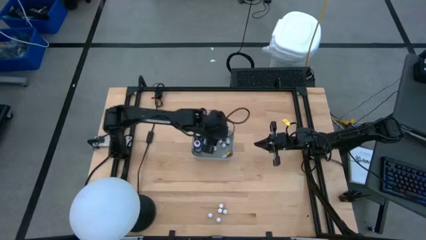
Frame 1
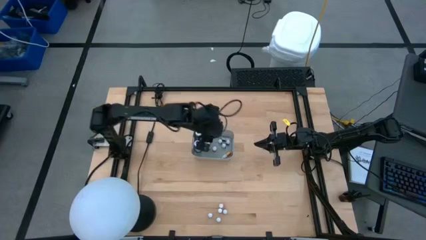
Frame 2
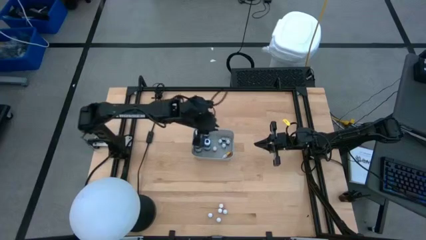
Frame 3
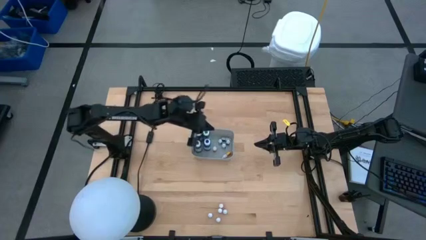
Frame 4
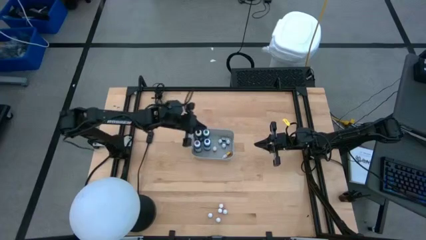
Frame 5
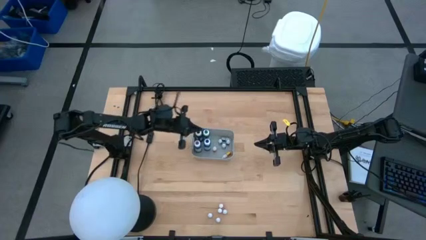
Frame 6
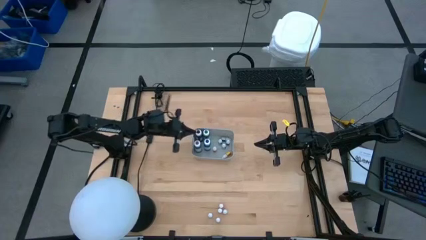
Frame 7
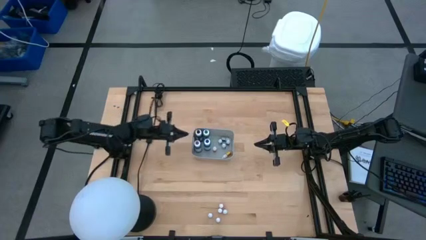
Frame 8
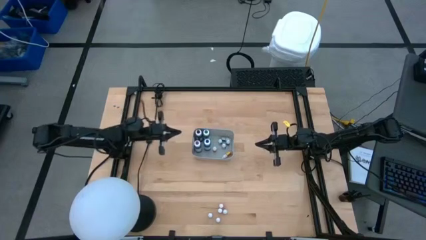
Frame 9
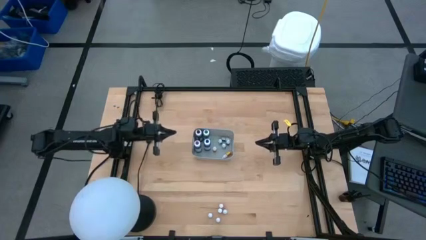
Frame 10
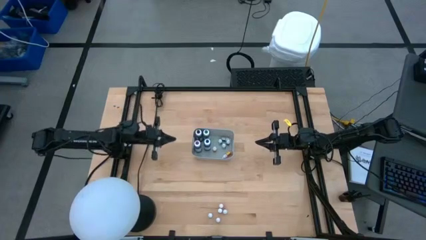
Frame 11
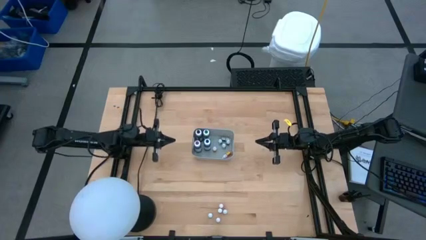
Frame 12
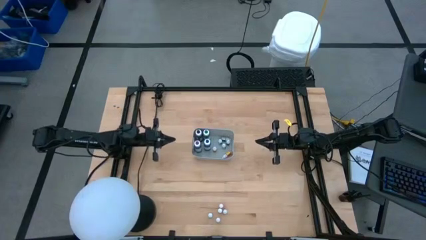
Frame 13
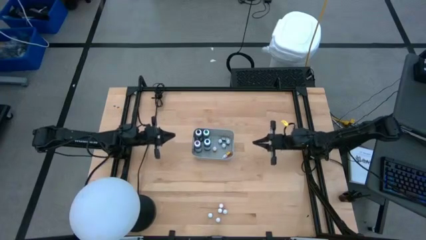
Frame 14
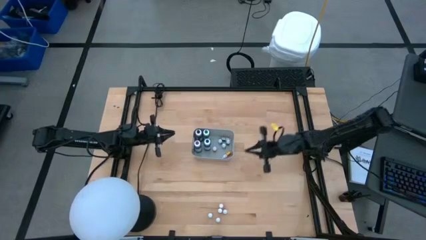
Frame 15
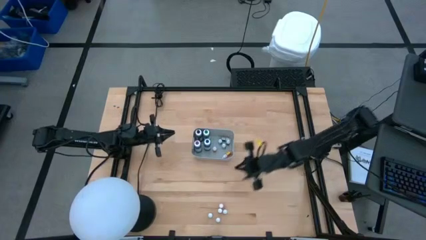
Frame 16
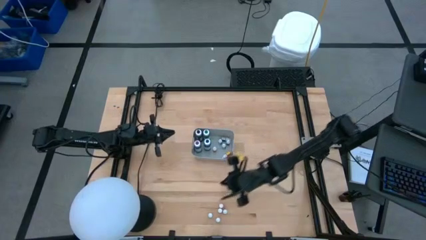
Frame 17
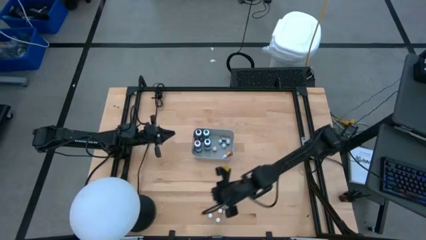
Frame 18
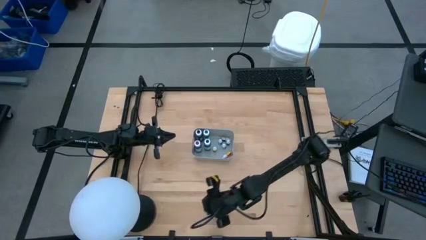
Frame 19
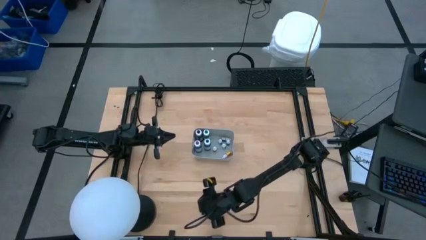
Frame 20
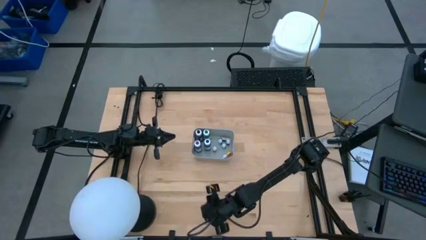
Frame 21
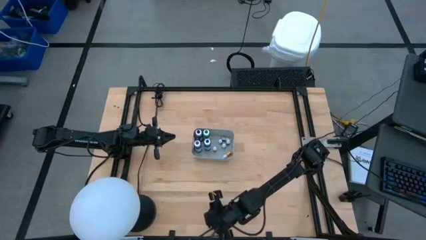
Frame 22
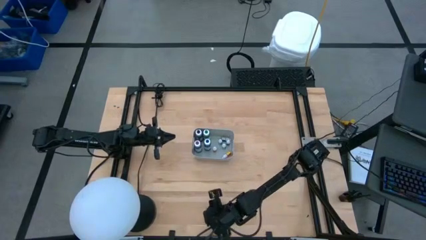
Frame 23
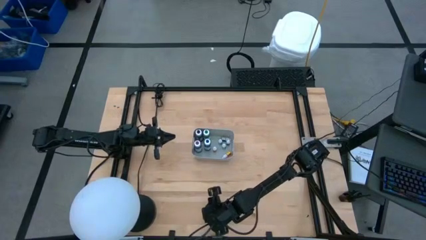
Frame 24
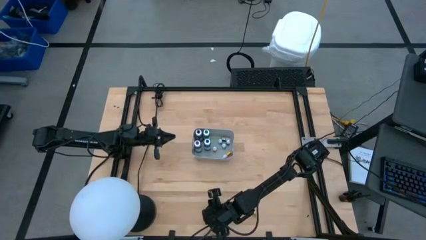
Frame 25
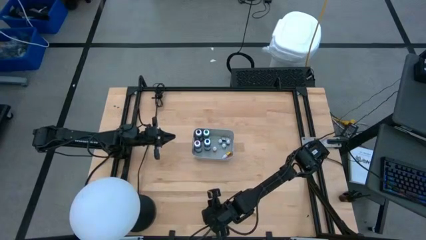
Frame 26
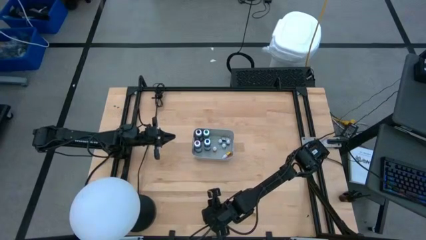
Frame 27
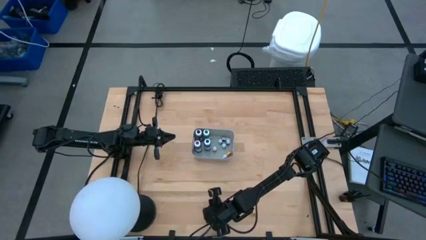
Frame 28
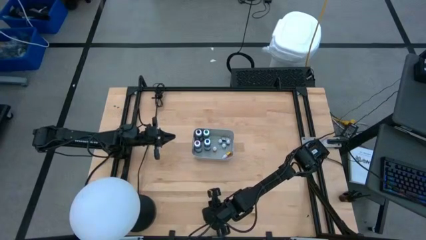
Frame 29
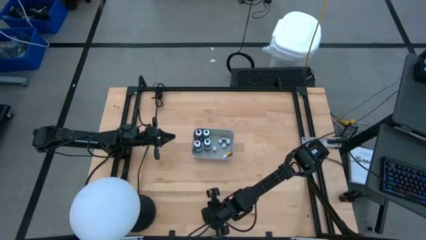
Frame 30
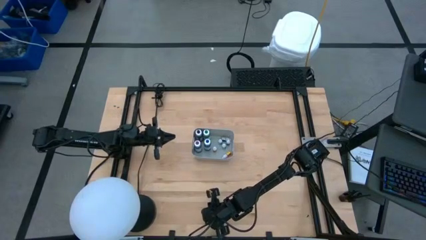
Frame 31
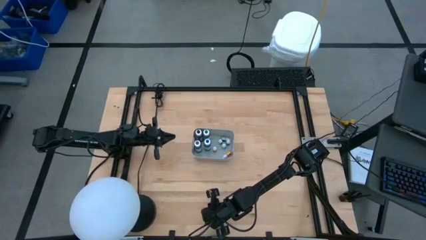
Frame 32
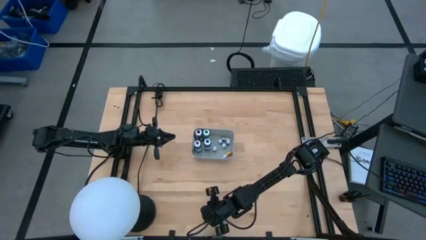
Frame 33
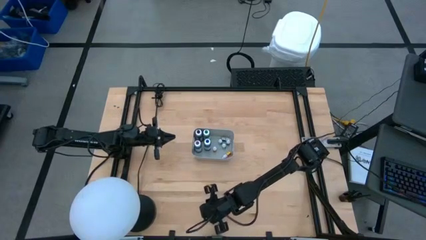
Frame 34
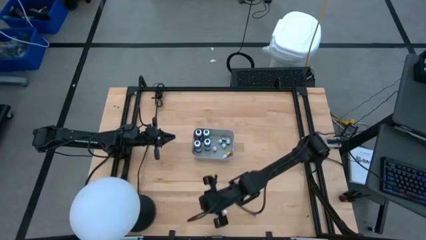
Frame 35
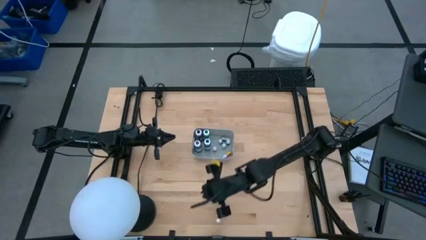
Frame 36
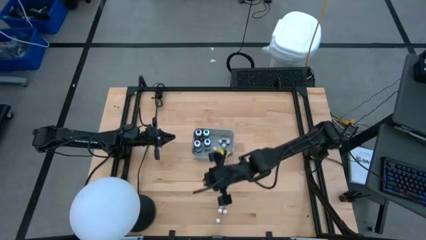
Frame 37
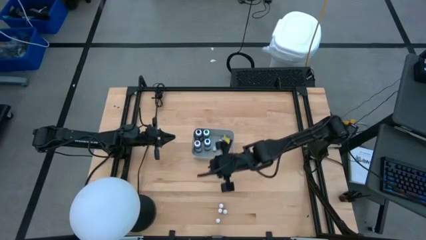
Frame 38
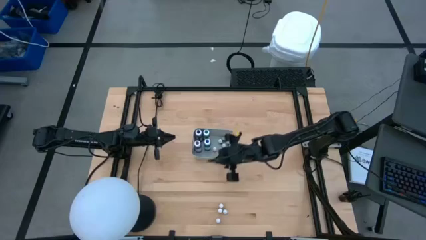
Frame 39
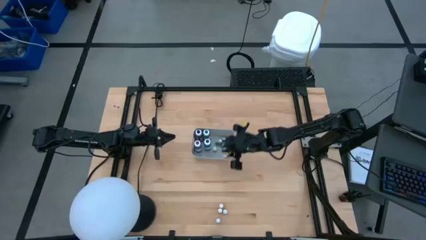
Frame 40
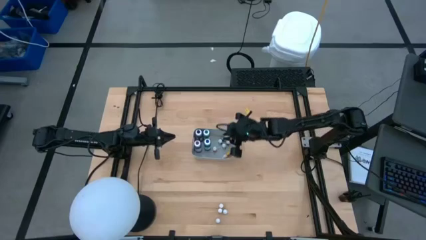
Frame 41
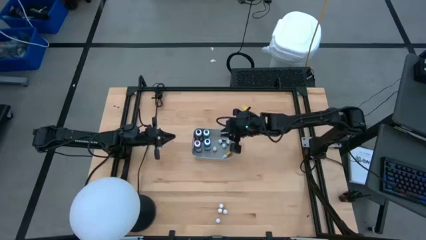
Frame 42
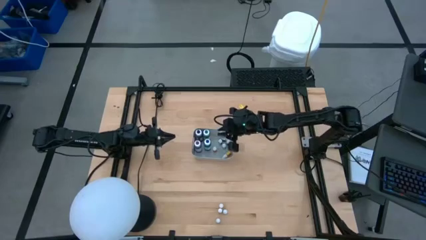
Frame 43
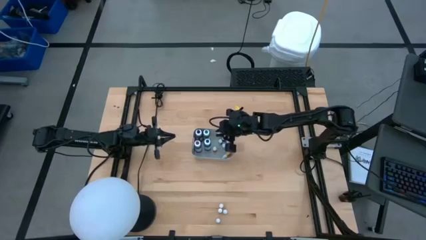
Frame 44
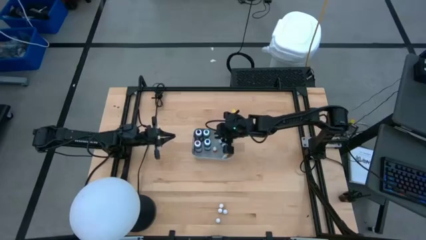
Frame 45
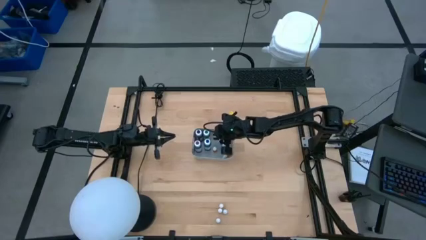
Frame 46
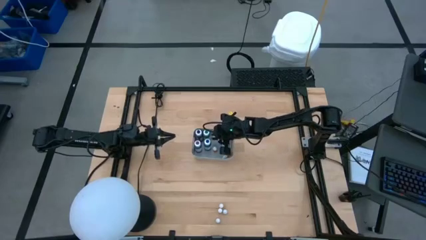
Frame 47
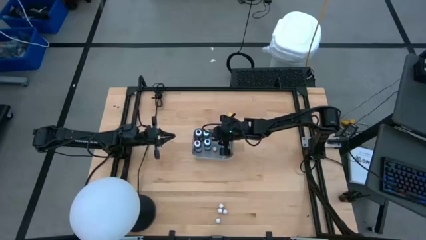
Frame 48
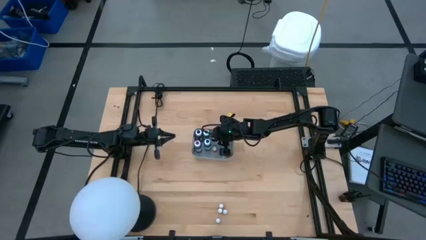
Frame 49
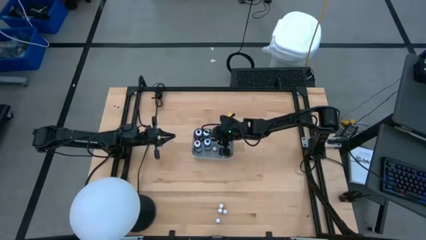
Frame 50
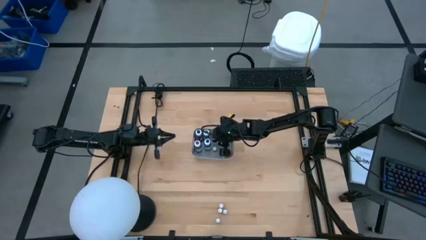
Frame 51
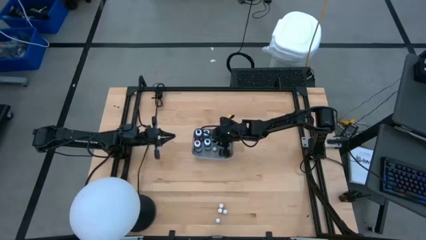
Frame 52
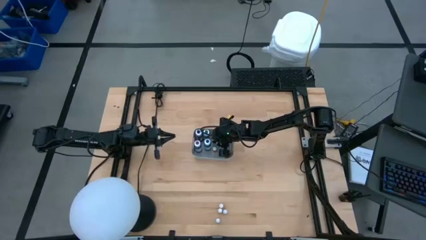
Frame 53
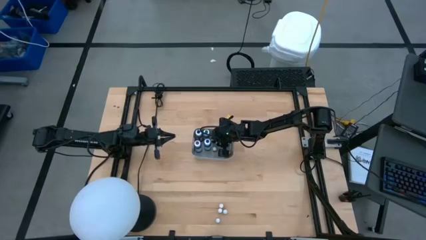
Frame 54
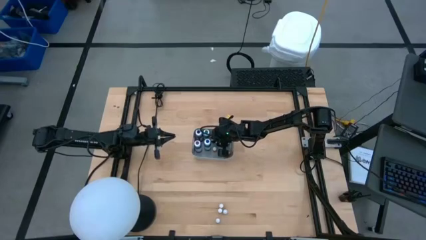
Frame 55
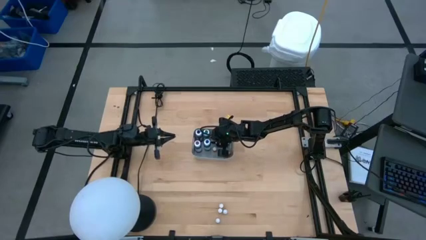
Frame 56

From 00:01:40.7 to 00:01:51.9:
Task: Pick & Place food coloring
Put the small violet food coloring bottle into the gray bin

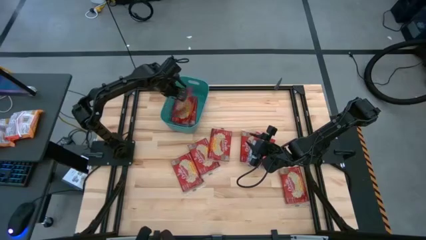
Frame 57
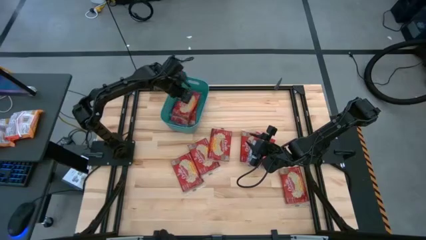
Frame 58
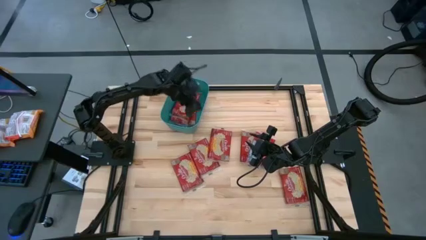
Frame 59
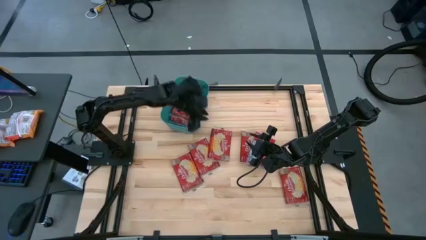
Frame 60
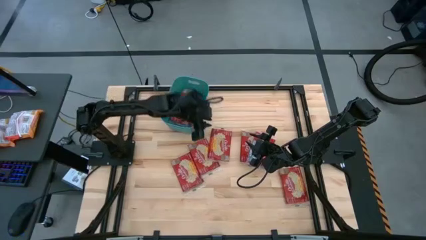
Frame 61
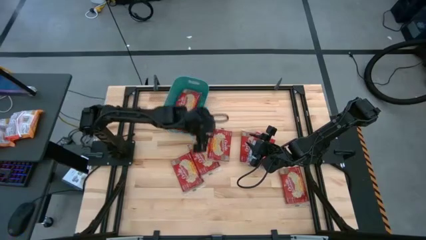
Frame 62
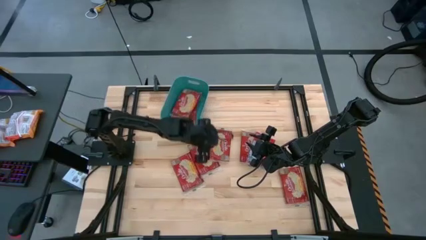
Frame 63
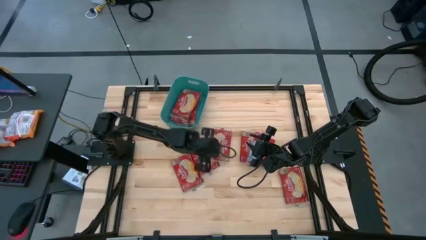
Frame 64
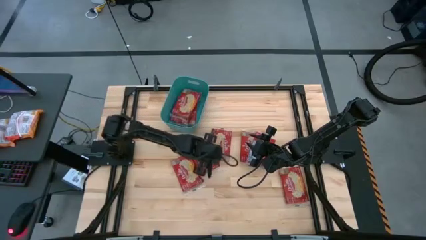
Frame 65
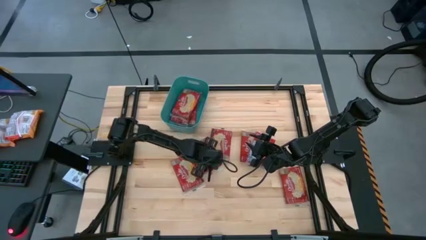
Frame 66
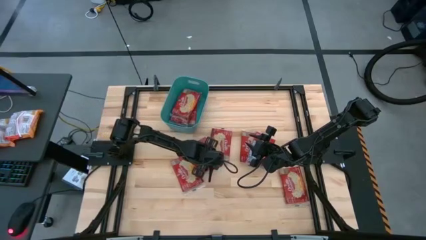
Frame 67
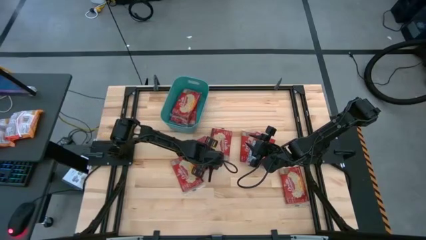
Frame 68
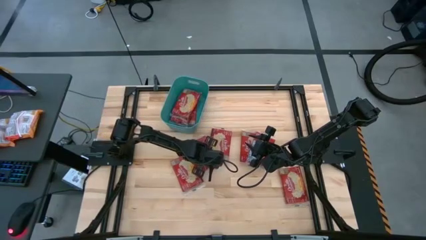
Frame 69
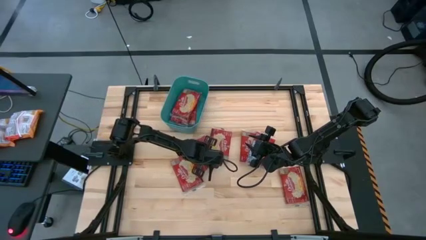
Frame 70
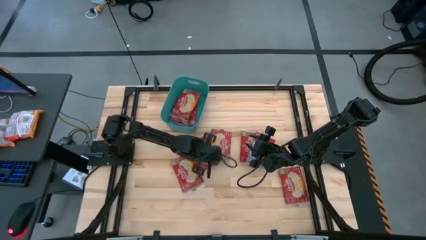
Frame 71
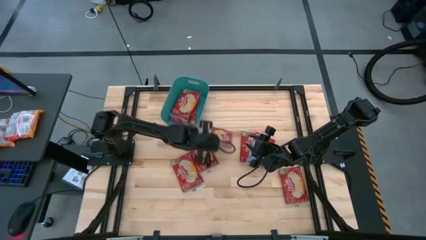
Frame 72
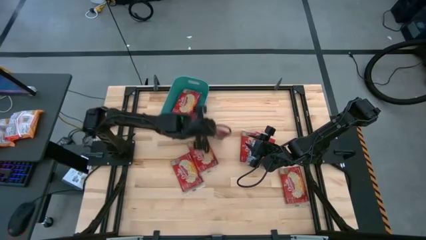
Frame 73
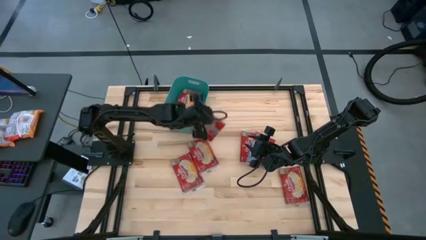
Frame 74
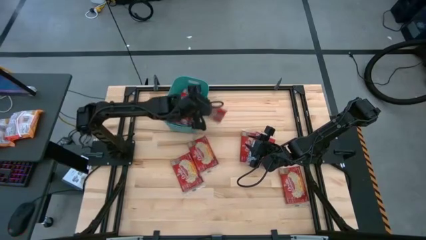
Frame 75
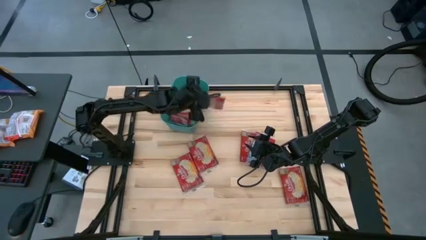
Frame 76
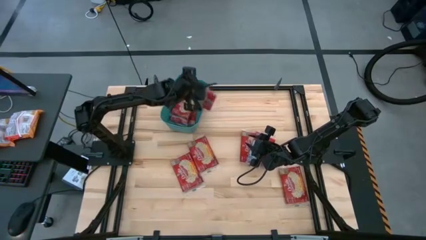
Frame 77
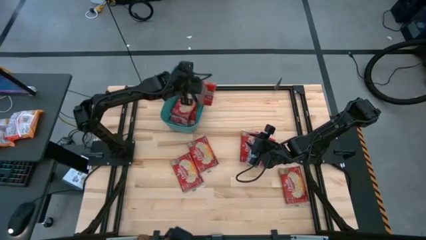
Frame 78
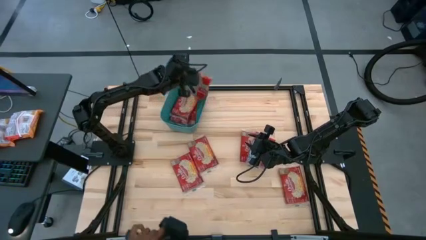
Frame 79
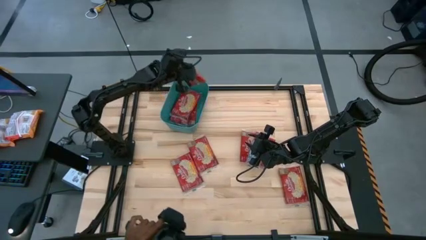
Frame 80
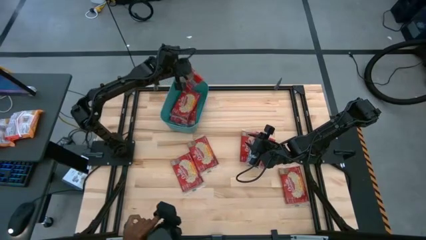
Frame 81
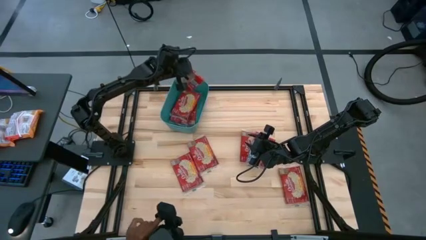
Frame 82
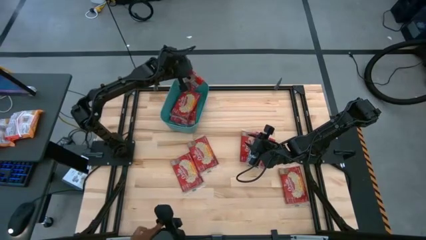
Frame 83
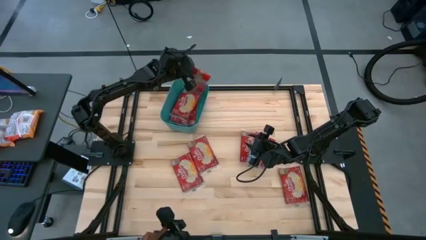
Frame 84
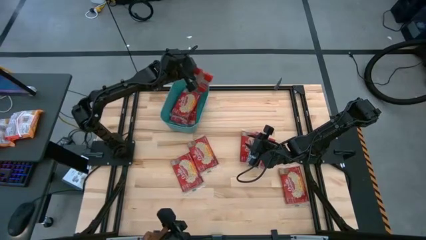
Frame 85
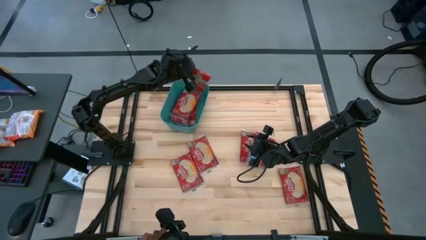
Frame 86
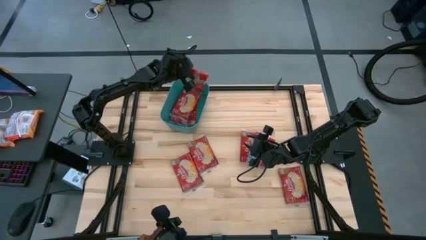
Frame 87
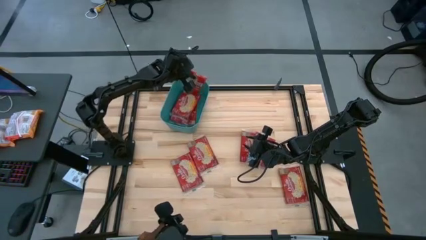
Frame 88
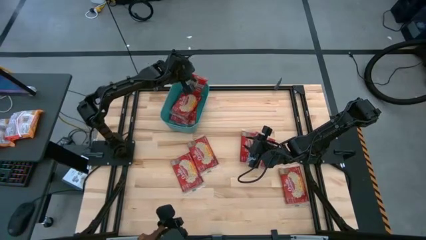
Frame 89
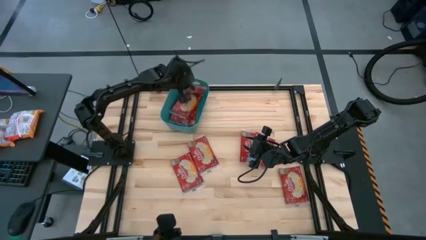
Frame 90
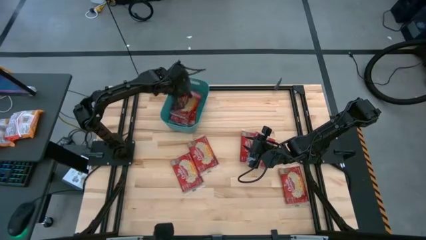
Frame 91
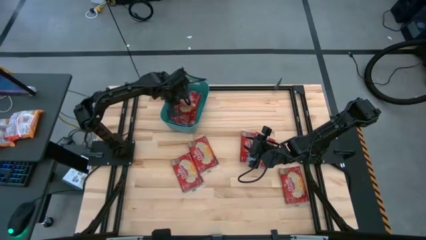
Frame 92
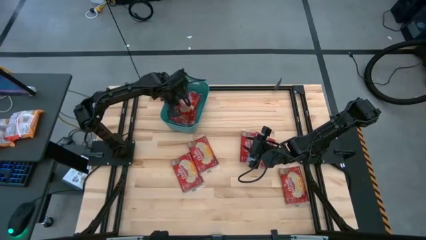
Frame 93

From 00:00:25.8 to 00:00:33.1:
Task: Sort popcorn bags into baskets
Put the red popcorn bag into the green bin
